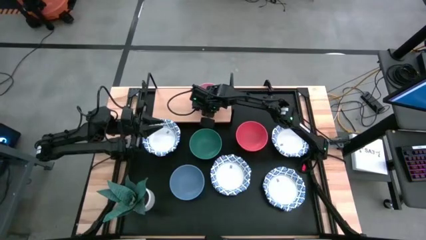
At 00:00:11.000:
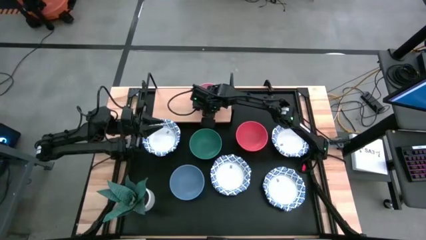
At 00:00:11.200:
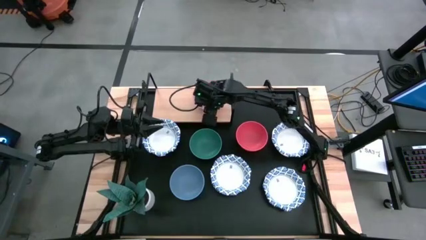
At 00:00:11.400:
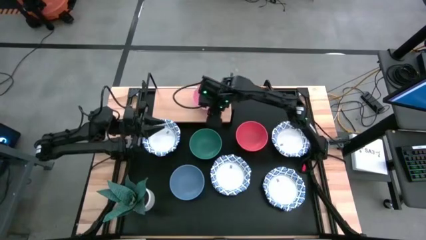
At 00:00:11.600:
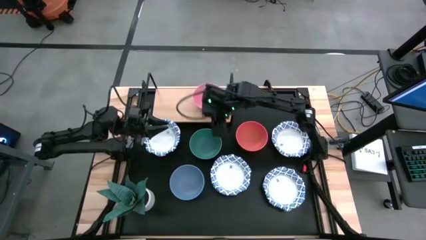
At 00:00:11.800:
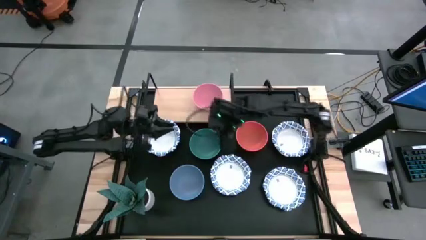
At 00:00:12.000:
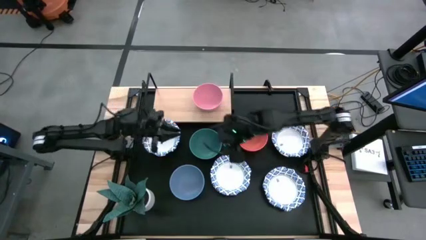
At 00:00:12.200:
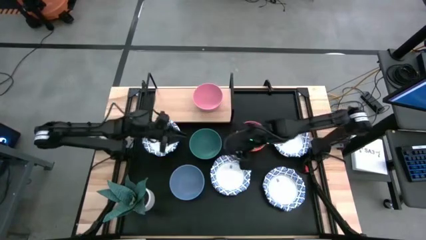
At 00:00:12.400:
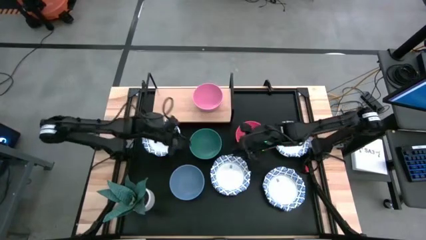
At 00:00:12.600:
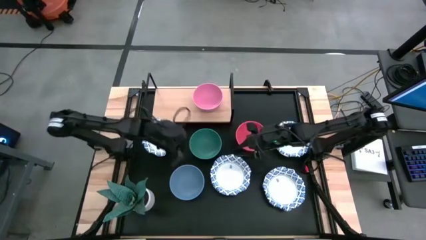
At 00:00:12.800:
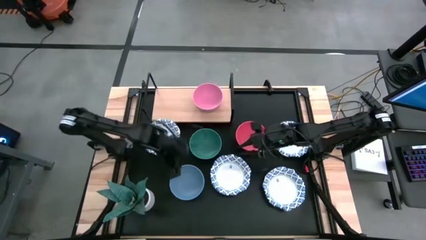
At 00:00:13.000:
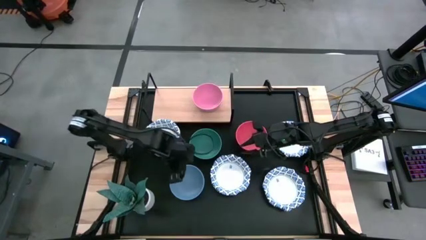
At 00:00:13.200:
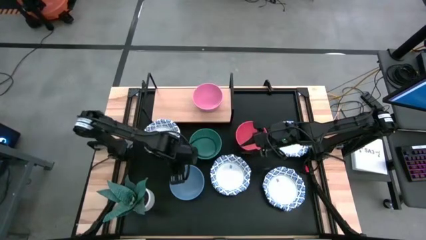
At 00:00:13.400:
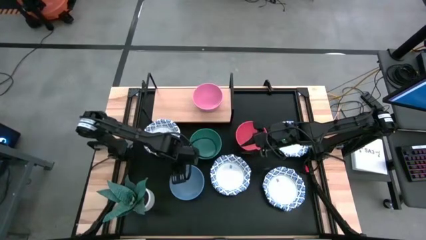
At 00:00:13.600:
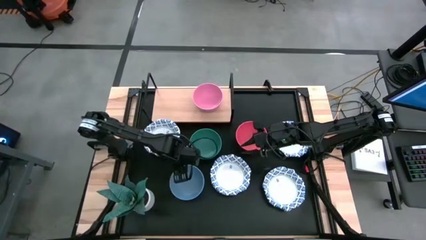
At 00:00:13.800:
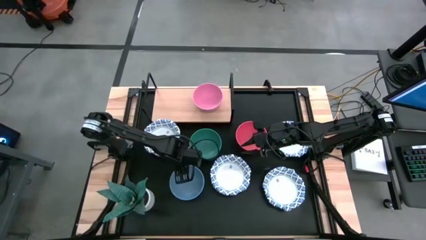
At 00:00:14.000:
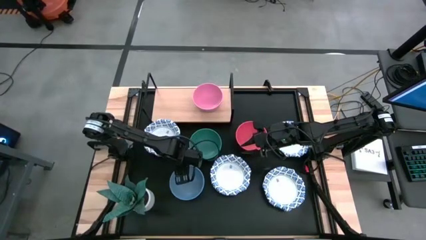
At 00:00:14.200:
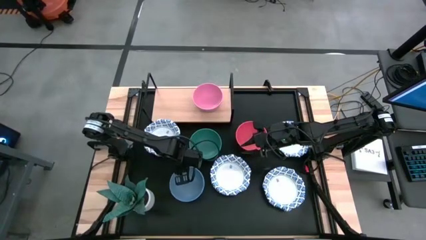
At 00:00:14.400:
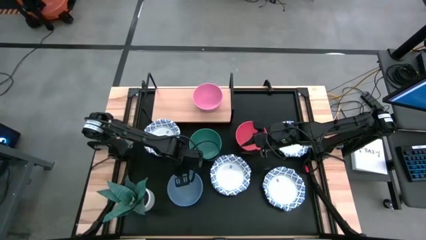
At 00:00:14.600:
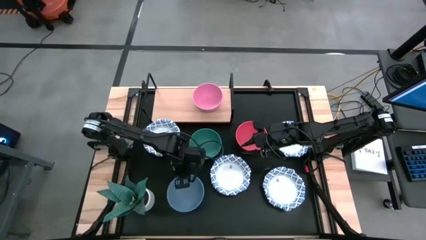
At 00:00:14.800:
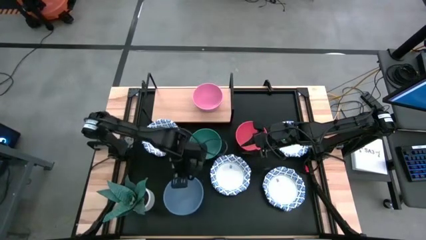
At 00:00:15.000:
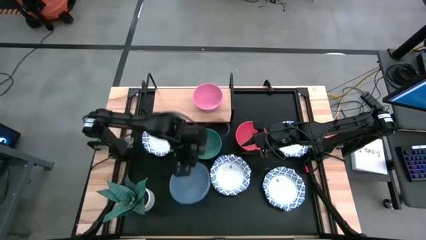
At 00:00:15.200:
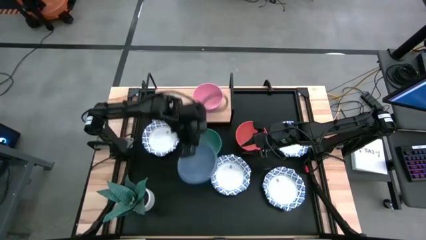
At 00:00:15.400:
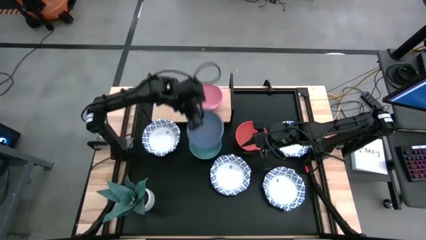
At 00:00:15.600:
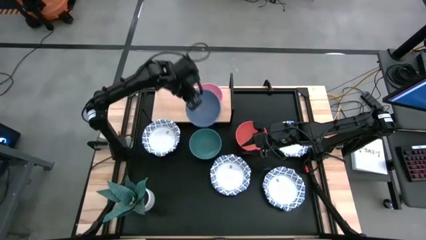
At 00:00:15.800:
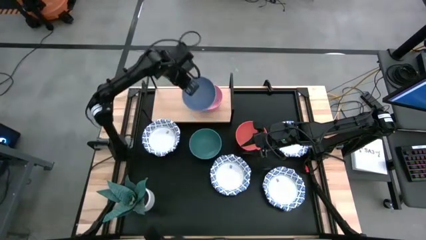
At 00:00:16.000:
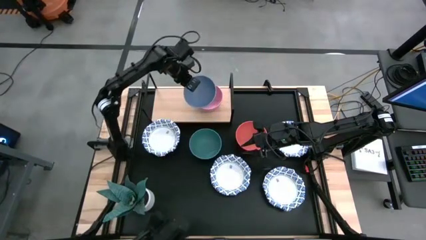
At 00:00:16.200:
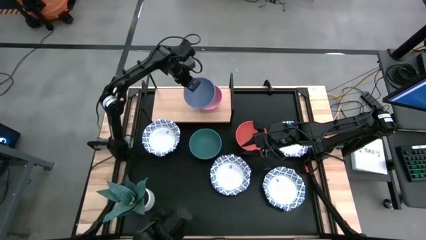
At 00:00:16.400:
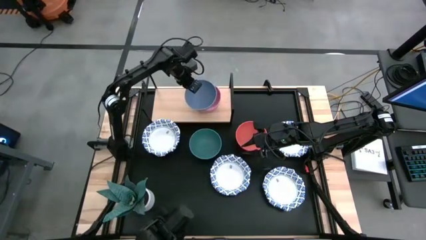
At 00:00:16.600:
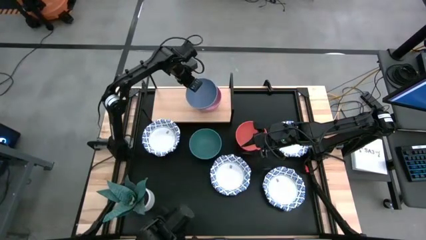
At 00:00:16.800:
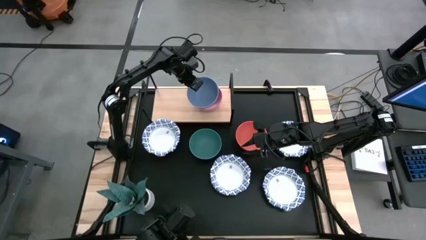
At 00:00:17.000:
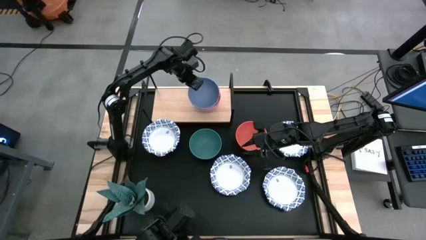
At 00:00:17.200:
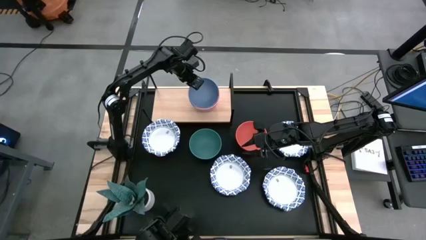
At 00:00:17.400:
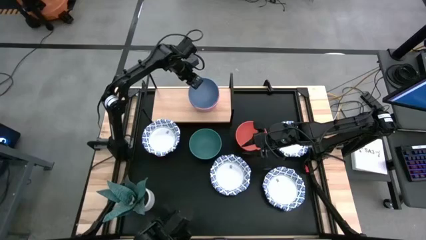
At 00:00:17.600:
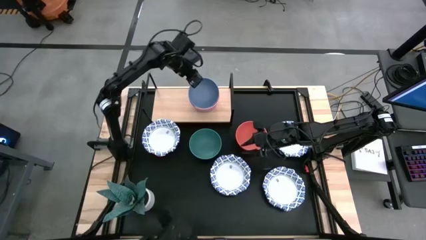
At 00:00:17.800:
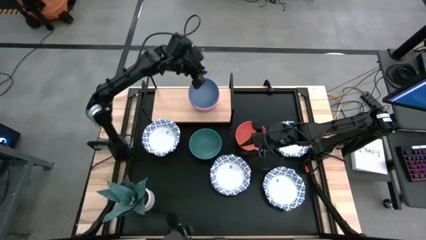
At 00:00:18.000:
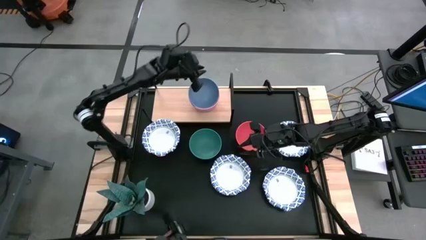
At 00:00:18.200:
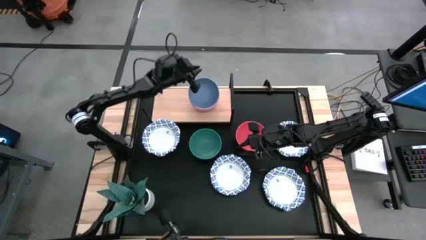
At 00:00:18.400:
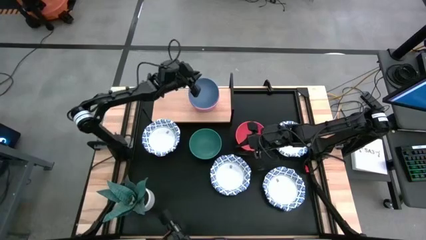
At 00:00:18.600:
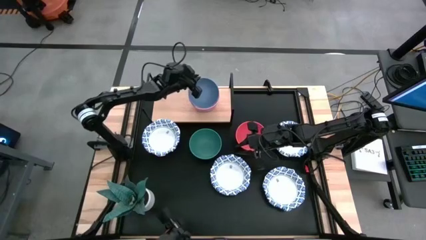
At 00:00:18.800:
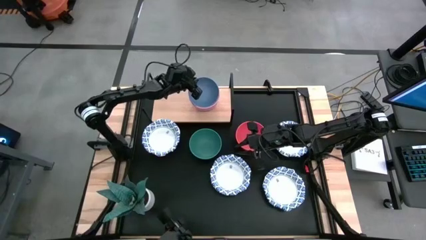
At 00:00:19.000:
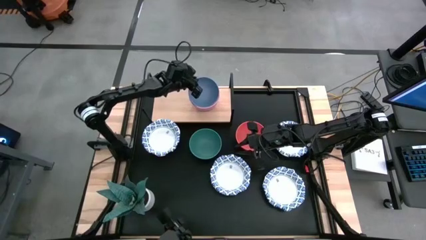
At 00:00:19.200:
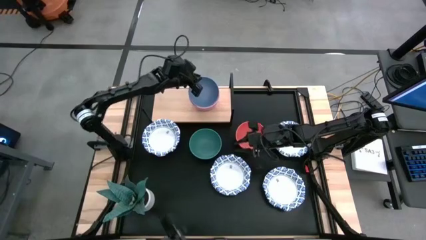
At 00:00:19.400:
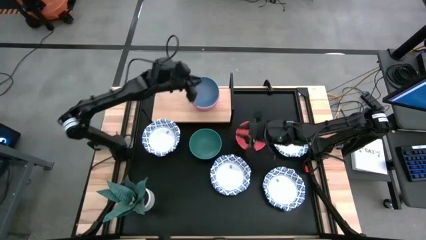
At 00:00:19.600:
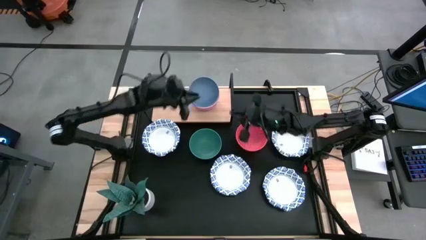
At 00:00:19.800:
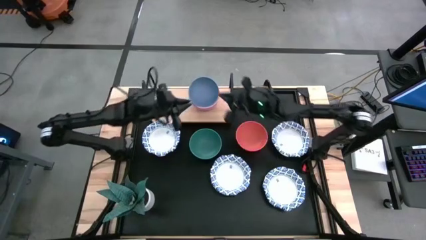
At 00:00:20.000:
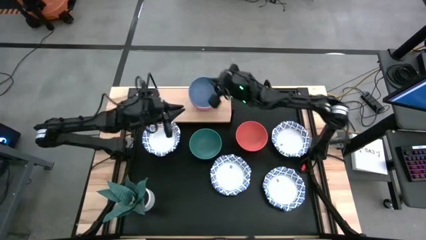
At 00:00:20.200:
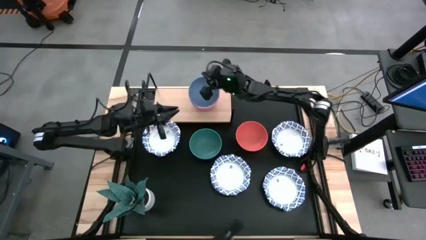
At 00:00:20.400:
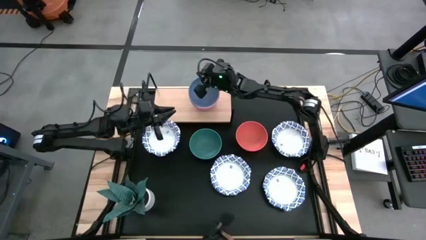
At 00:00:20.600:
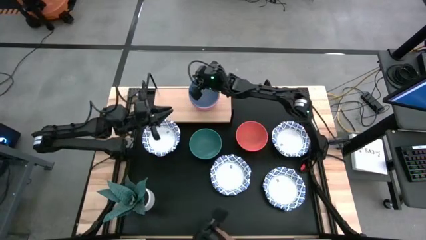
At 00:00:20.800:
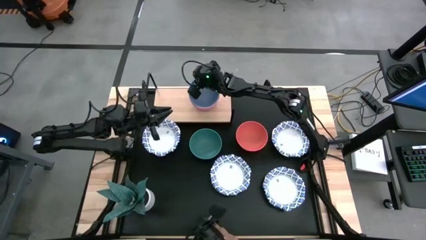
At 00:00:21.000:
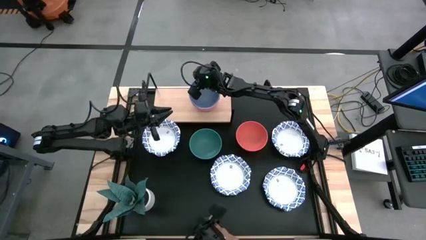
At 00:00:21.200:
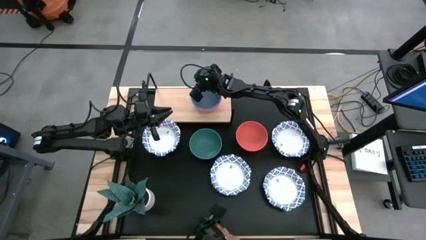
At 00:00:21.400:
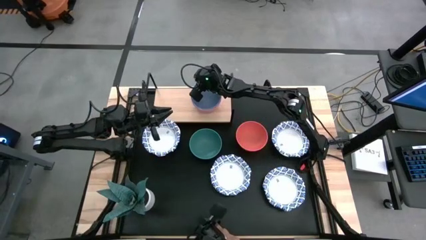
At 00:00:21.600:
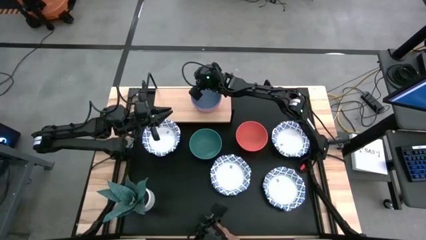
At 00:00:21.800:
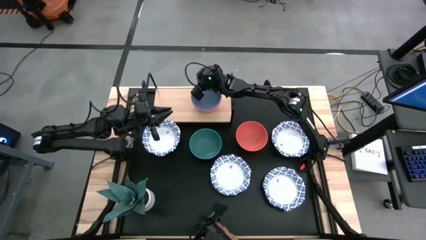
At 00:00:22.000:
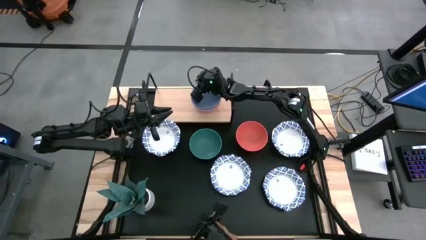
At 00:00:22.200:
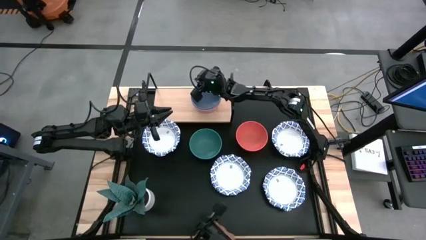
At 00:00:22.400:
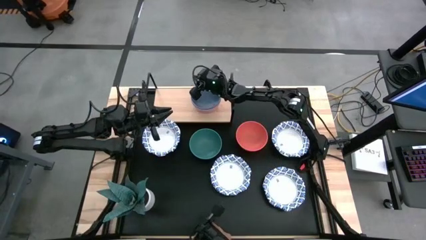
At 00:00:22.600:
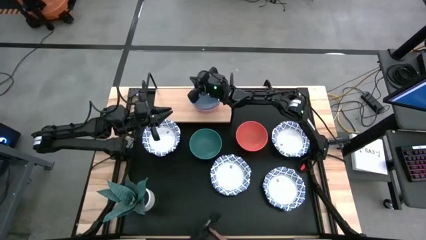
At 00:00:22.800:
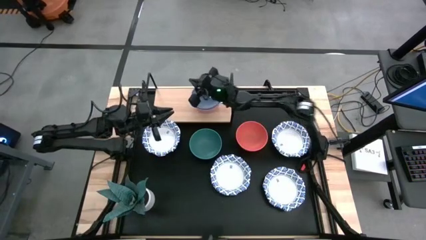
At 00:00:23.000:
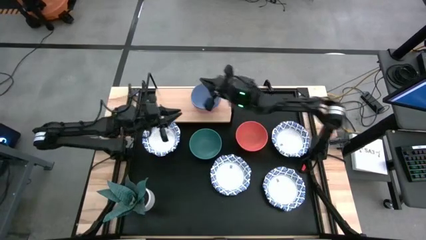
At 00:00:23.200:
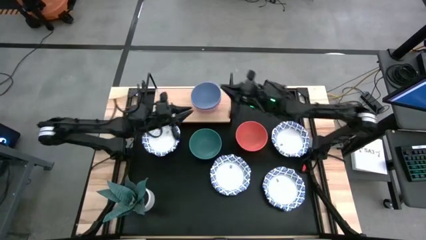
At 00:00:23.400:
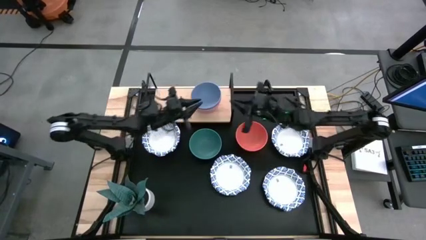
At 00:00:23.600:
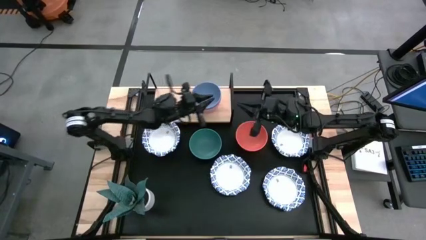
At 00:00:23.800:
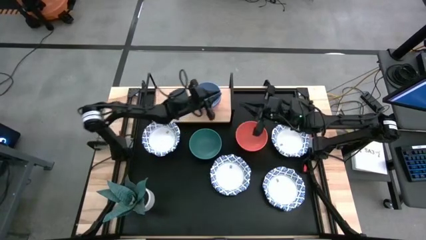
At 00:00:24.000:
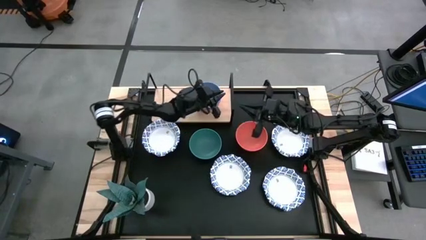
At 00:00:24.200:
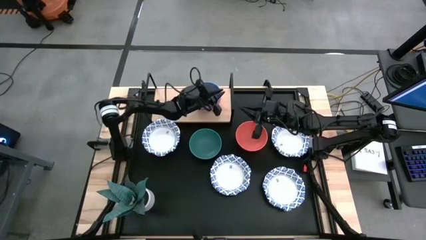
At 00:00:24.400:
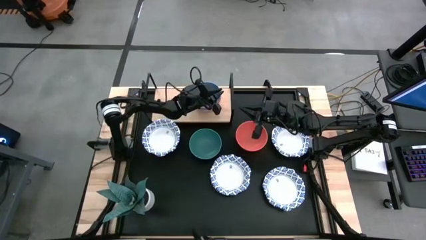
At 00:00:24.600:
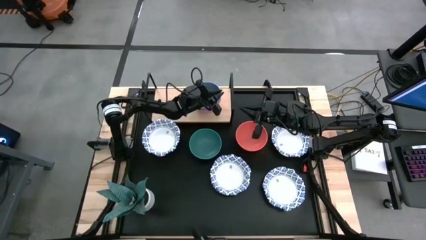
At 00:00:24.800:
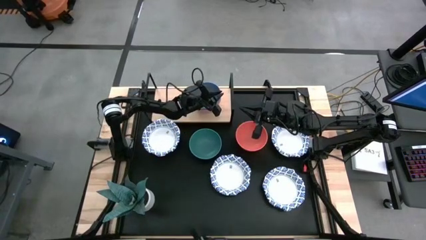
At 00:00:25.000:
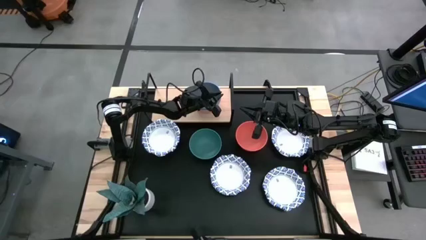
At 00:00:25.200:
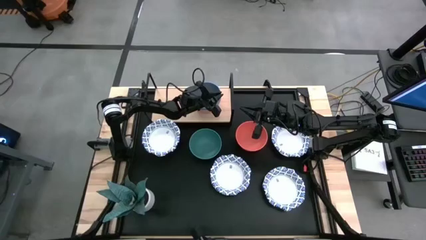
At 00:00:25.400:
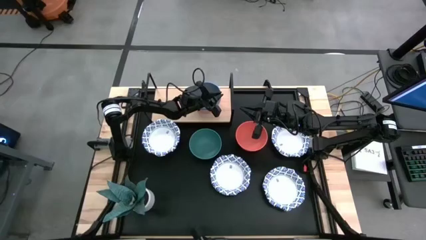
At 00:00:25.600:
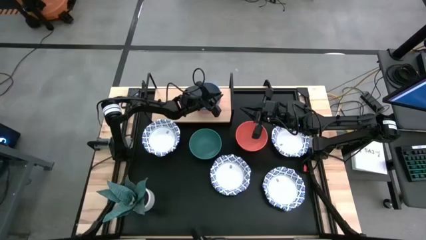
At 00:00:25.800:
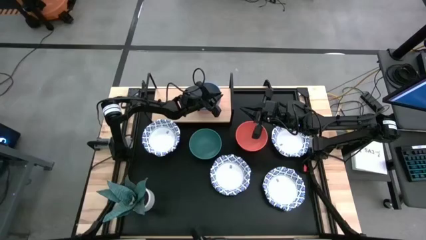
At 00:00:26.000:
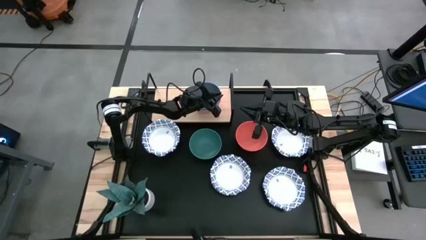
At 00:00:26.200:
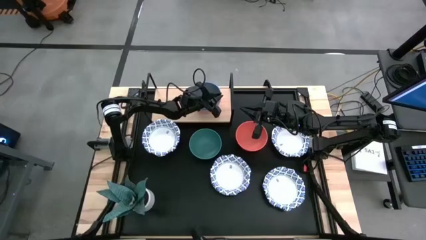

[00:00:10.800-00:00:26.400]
Task: Place and stack bowls onto a shelf
Stack the blue bowl on top of the pink bowl
